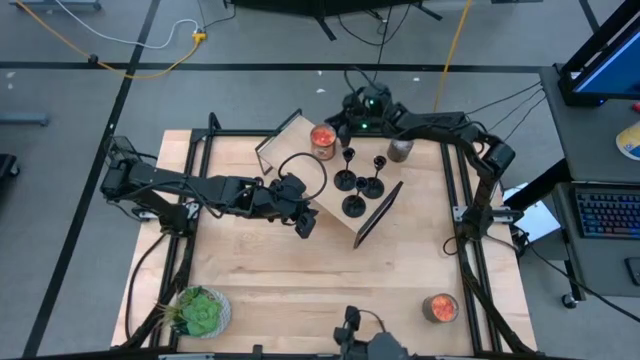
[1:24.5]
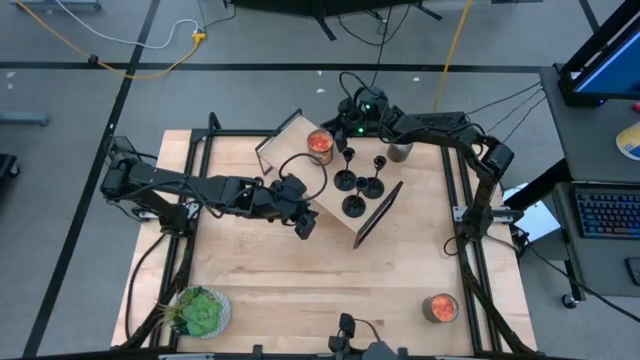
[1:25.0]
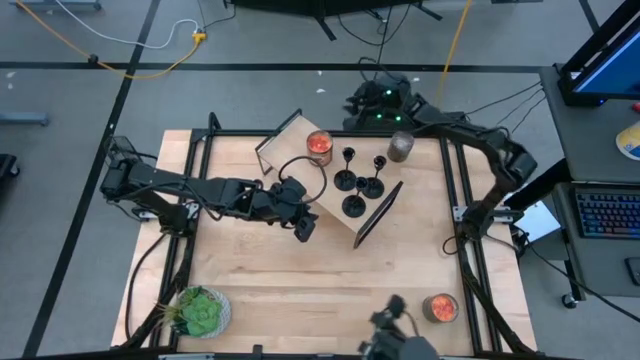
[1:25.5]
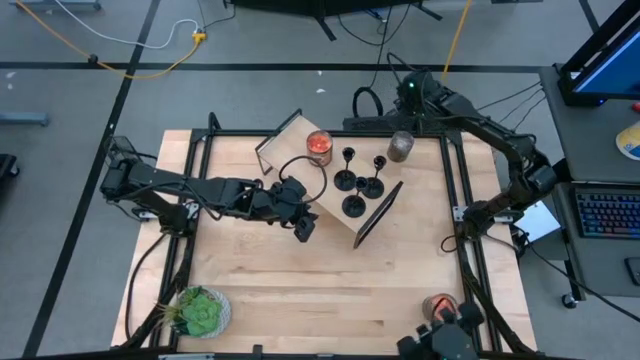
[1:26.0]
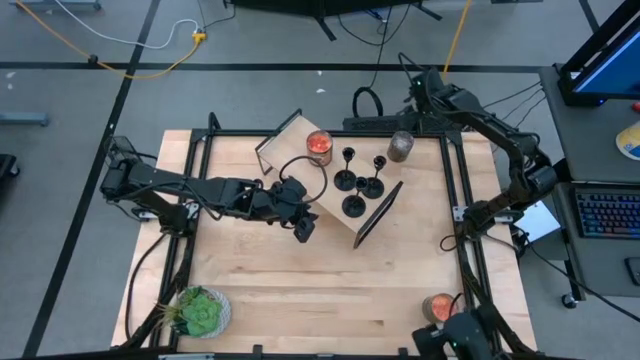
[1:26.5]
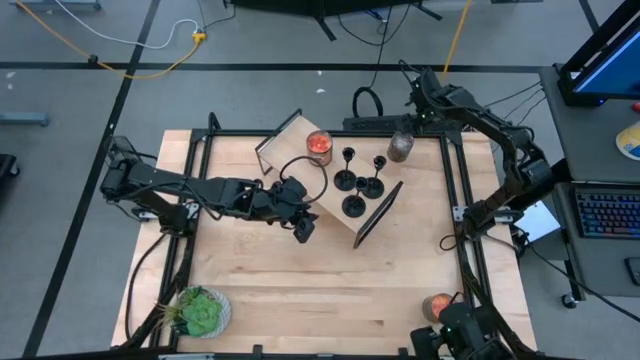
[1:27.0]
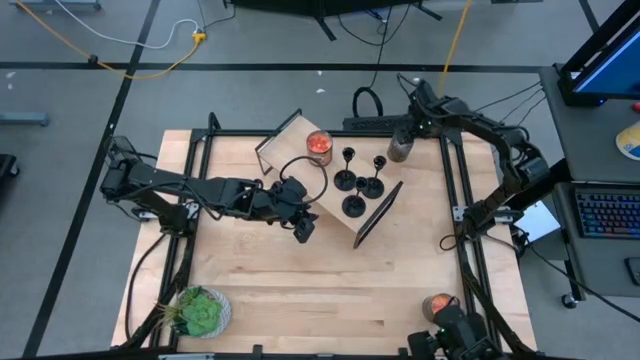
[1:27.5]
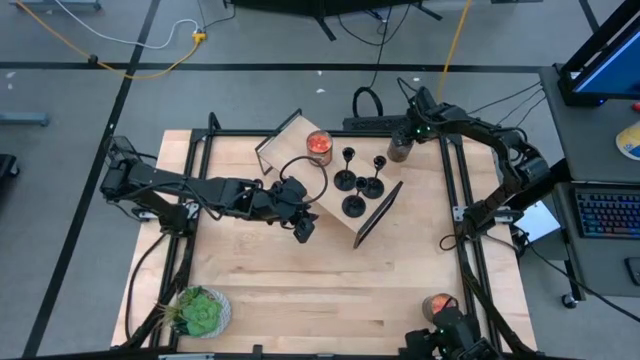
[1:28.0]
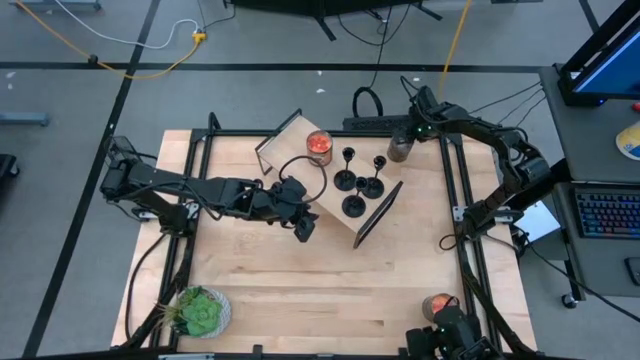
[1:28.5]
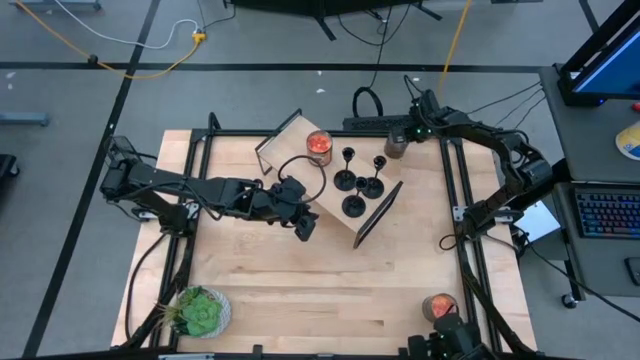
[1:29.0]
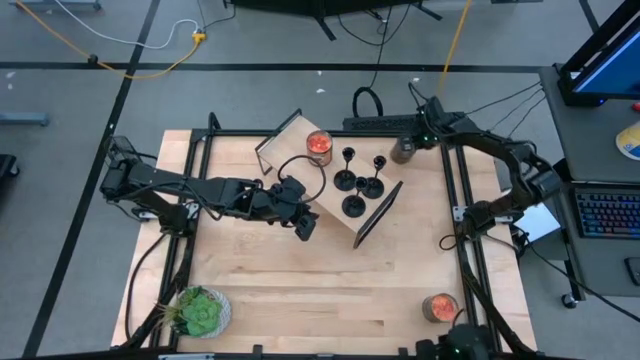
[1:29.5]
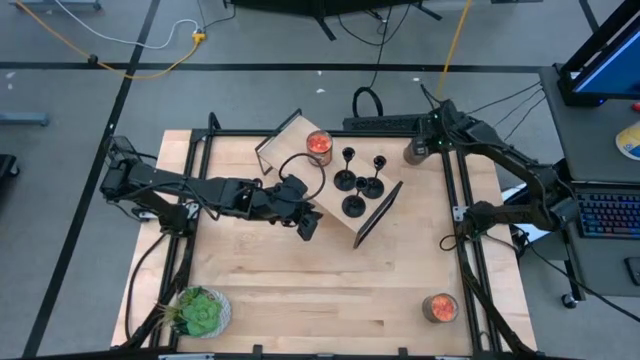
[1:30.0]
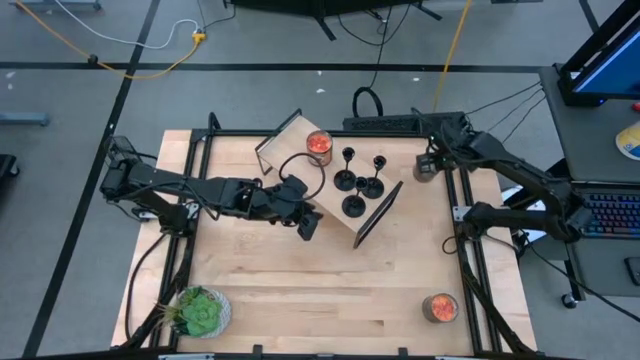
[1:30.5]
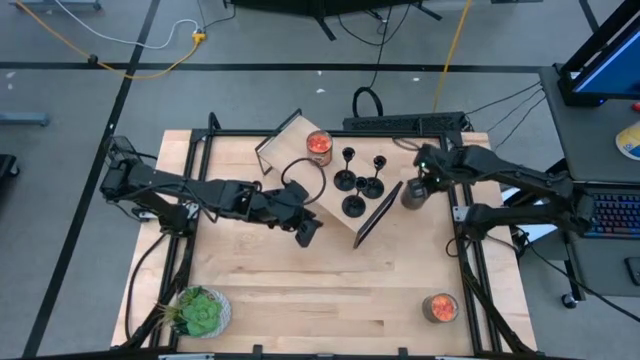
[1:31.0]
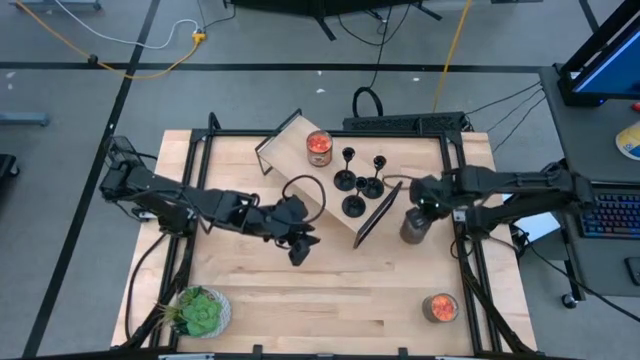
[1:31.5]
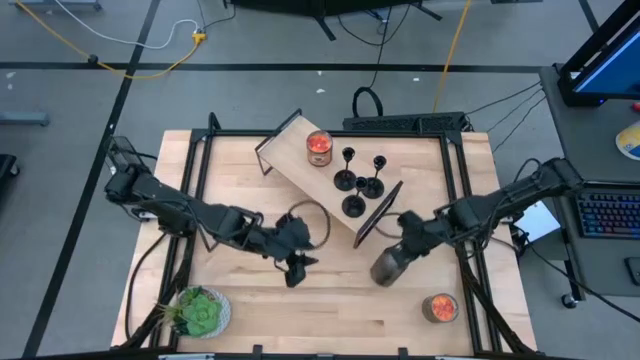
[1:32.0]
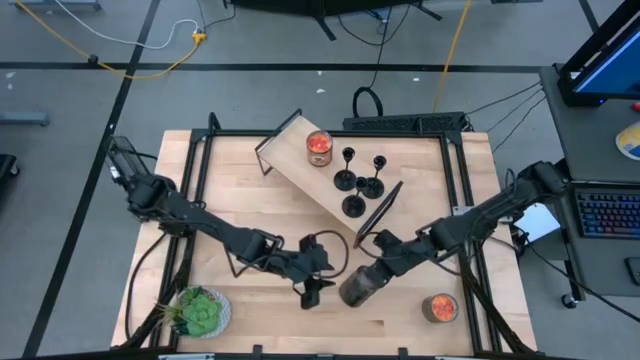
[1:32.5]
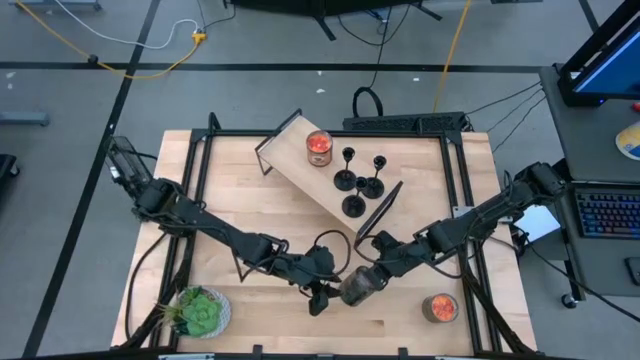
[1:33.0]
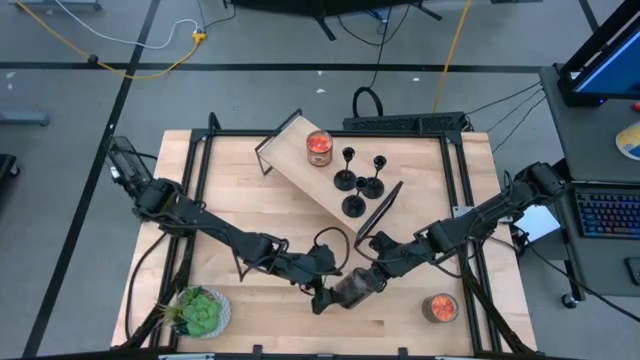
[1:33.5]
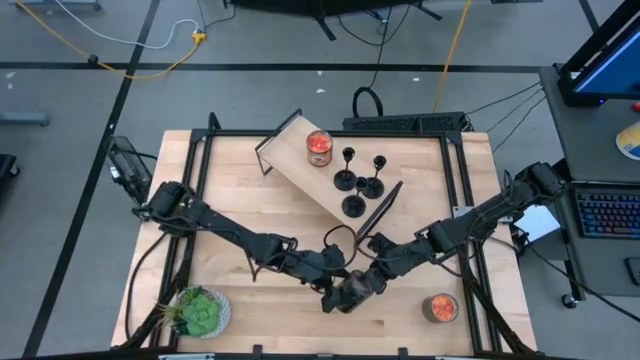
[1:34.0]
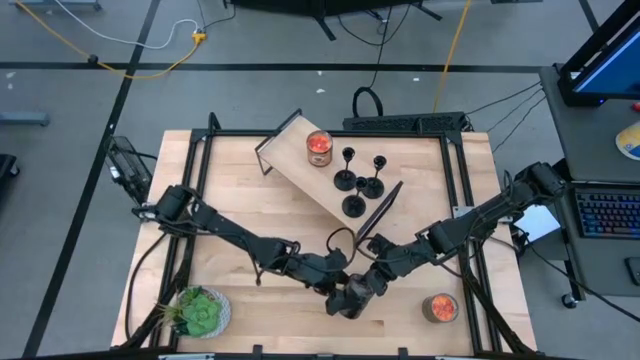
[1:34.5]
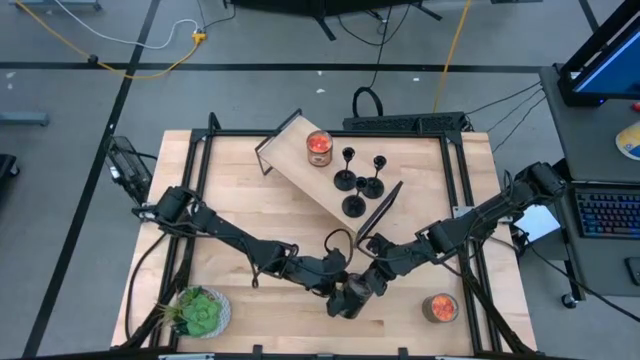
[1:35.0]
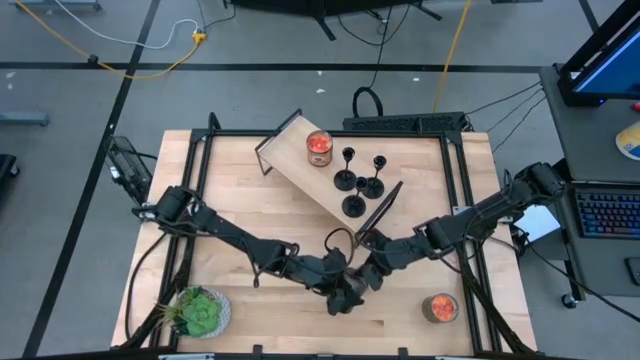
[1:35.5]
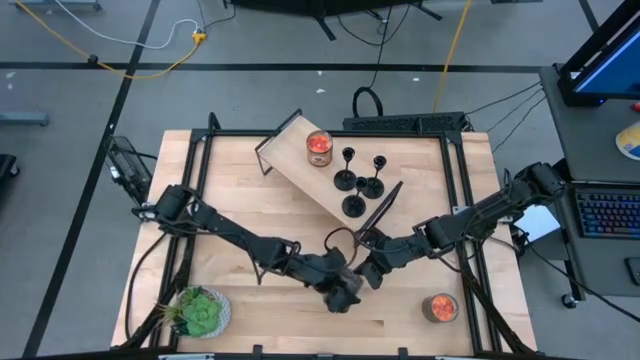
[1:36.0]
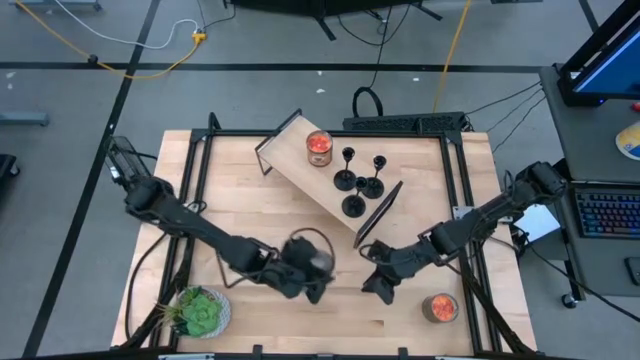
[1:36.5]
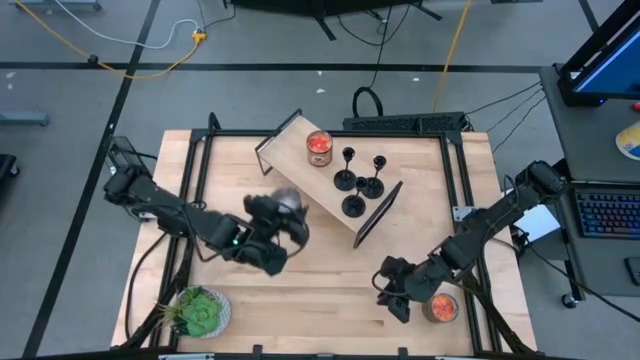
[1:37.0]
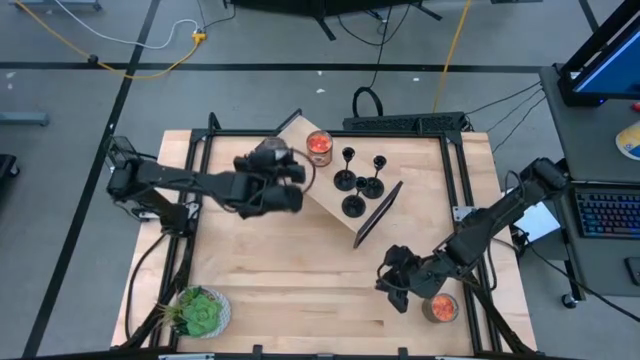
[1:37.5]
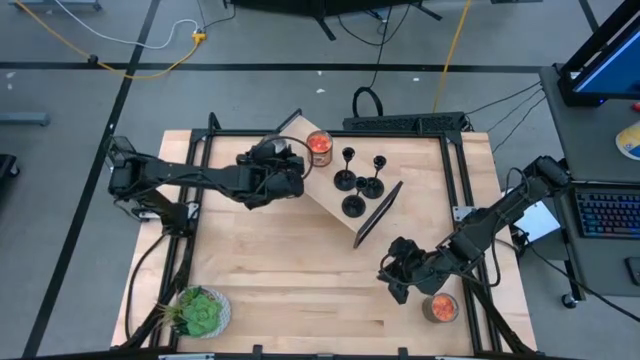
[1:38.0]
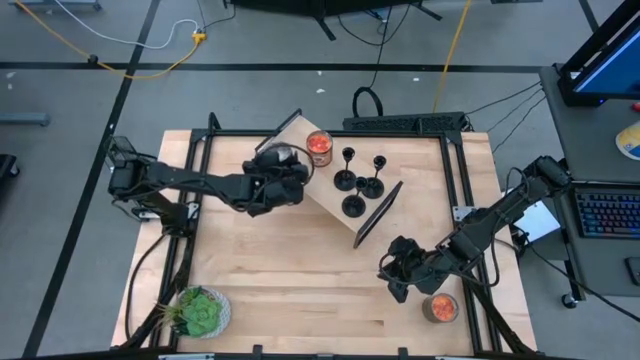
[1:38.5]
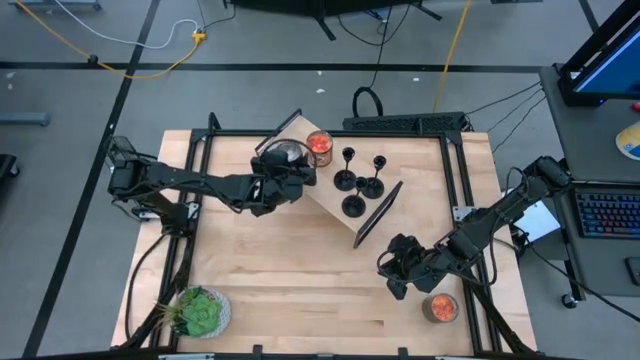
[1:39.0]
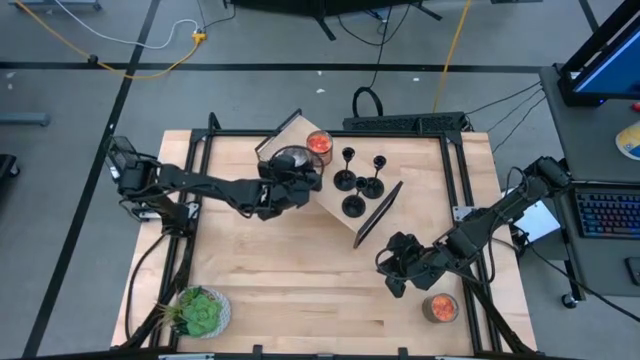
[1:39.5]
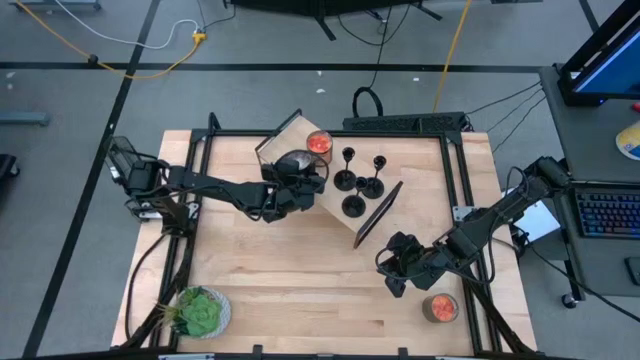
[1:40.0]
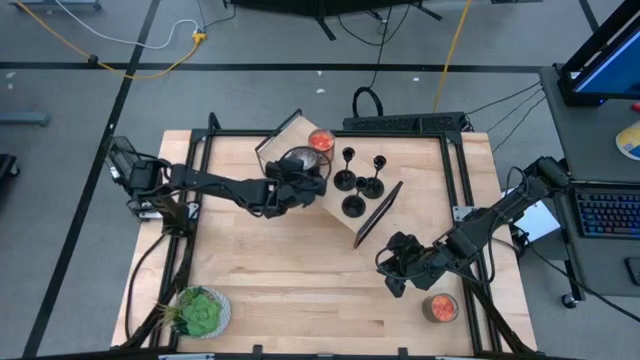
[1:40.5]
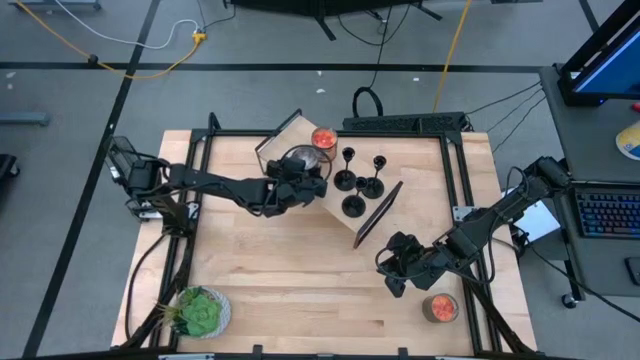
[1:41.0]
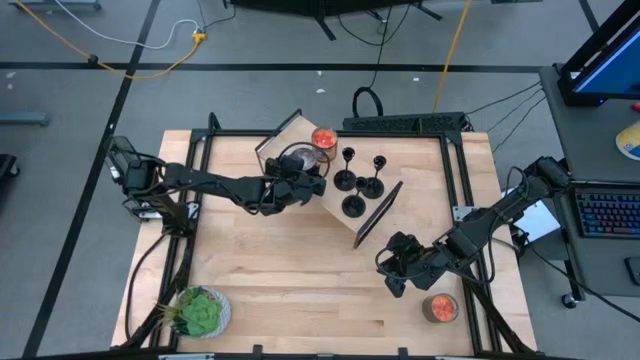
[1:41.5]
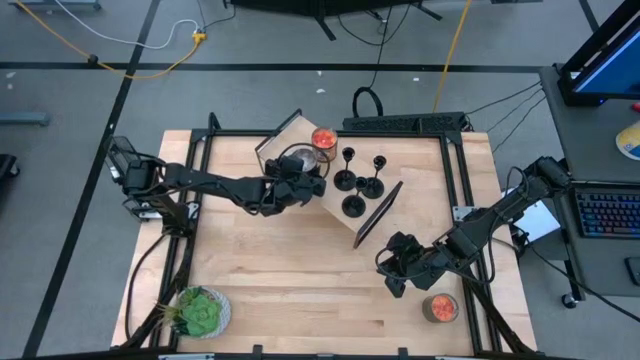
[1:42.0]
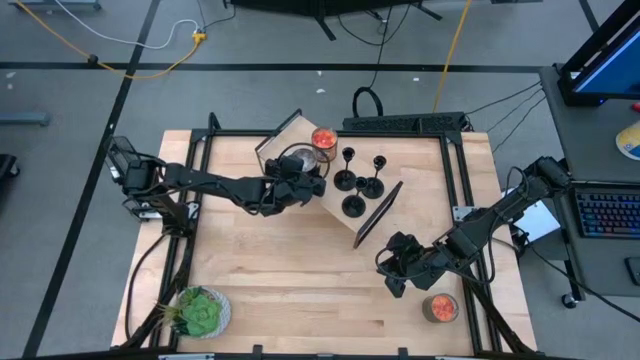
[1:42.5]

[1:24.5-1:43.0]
Task: Pick & Place candle stick holders
Put the brown scented candle on the shelf

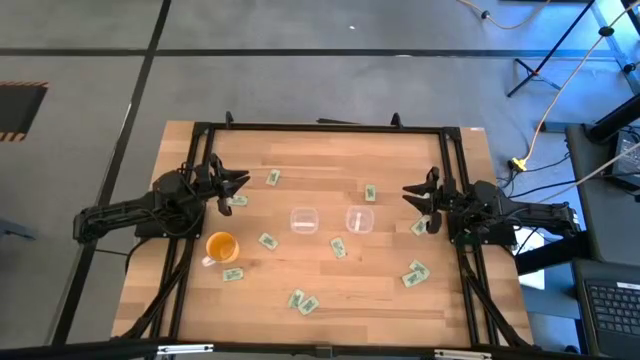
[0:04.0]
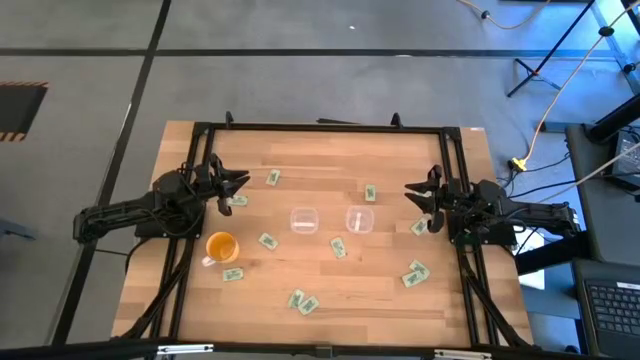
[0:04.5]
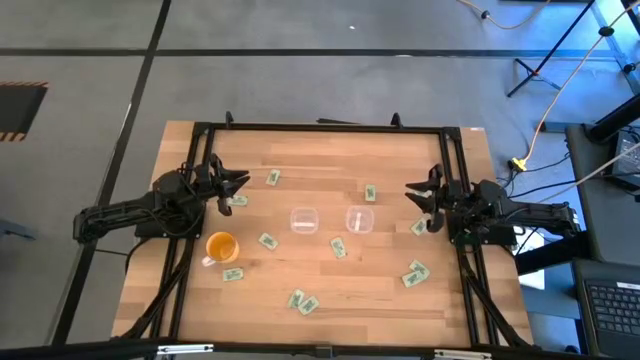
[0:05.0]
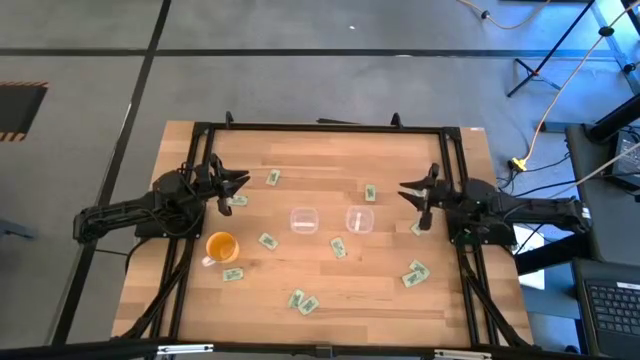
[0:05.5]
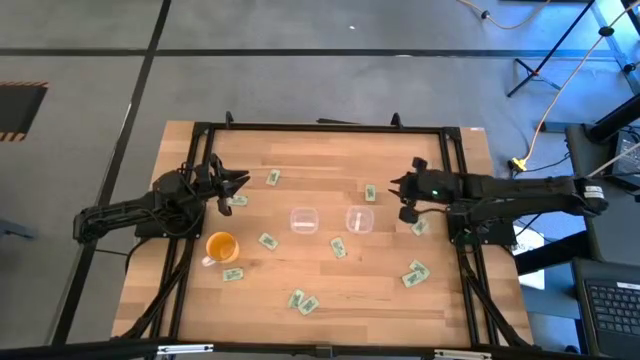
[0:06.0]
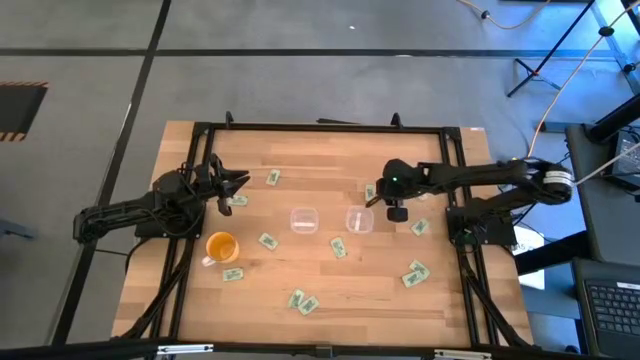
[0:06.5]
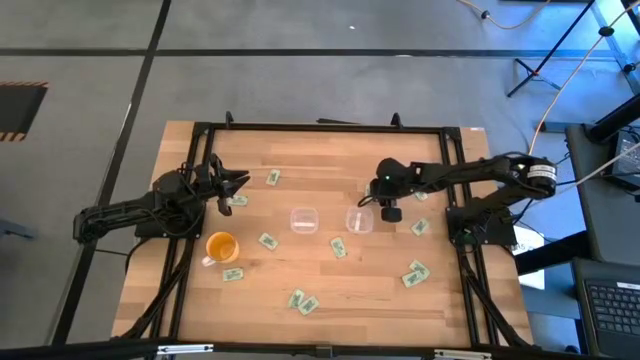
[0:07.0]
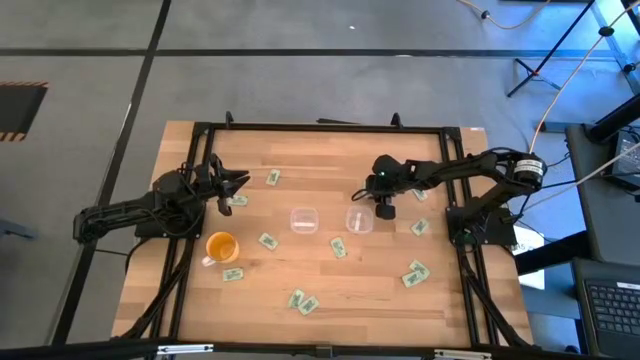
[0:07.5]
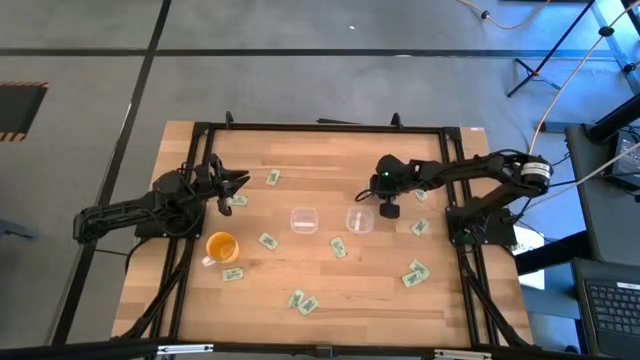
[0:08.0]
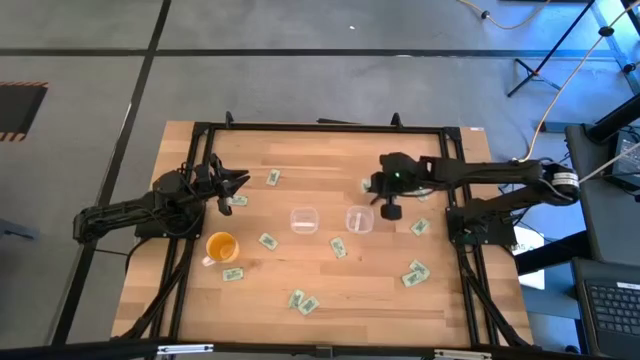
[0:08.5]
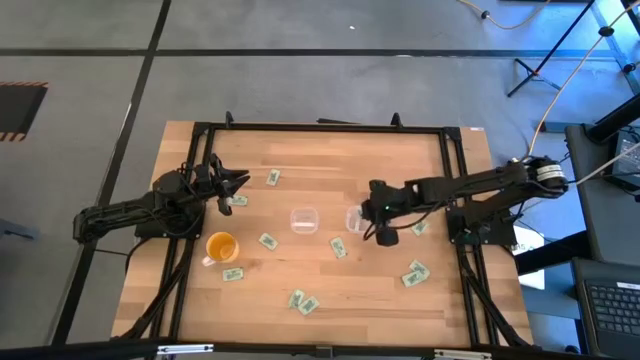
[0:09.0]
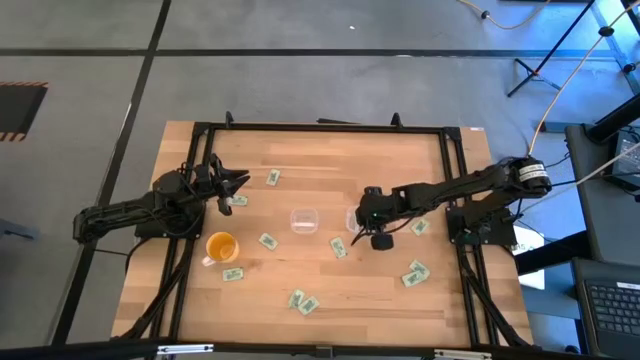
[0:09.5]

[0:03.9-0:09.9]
Task: Pick and place Stevia / Truvia into bins
Put the stevia packet into the right transparent container
